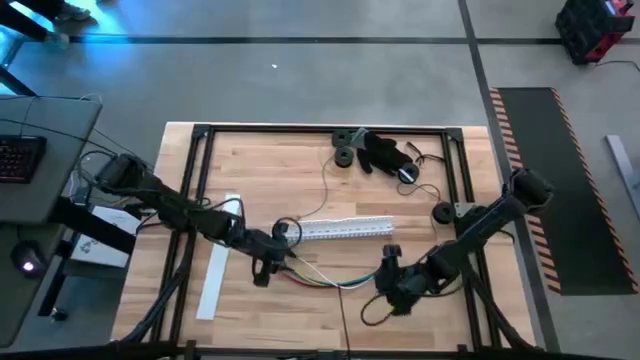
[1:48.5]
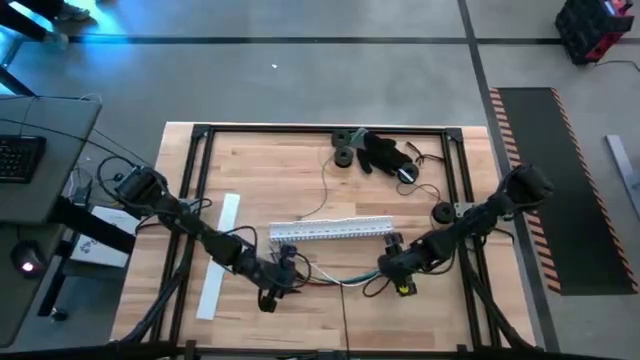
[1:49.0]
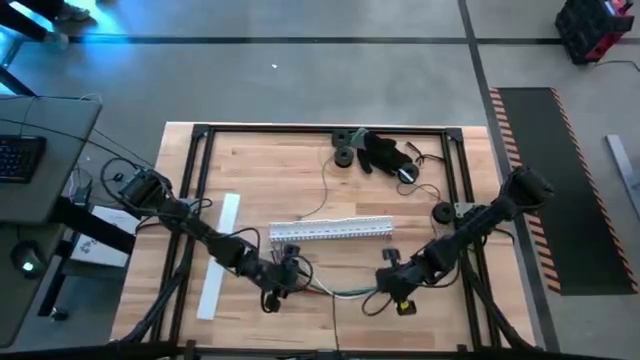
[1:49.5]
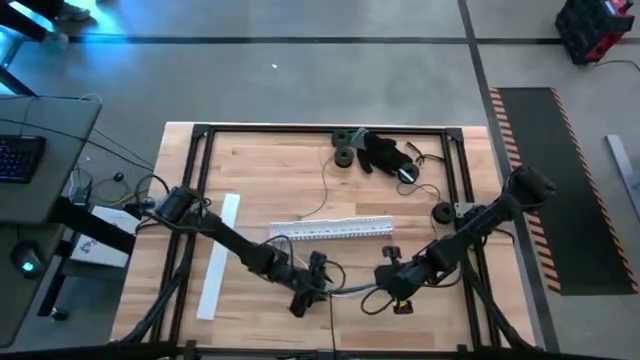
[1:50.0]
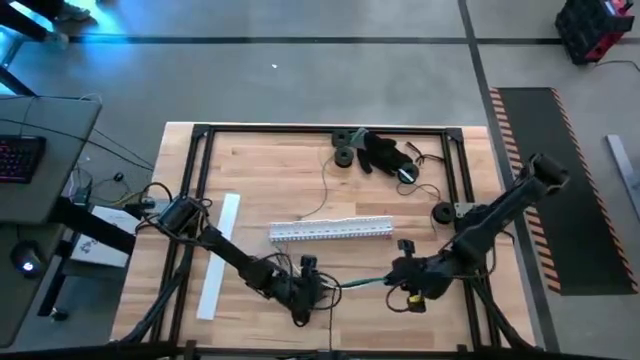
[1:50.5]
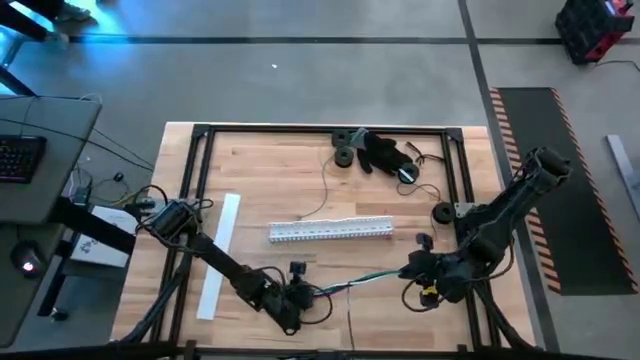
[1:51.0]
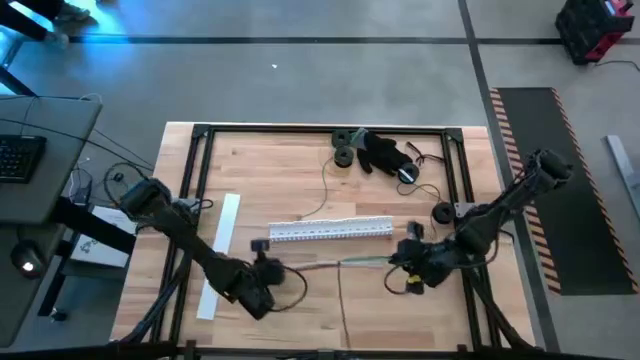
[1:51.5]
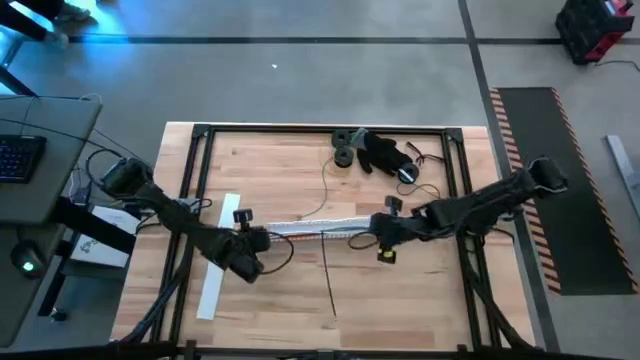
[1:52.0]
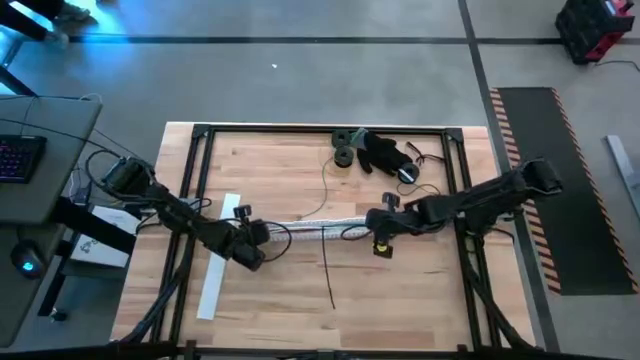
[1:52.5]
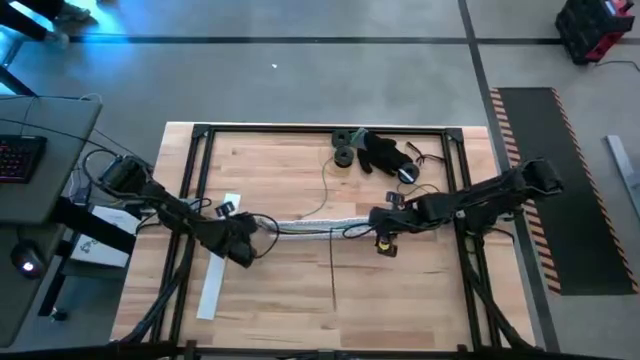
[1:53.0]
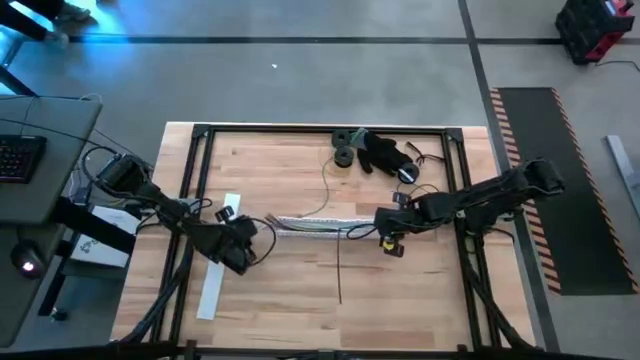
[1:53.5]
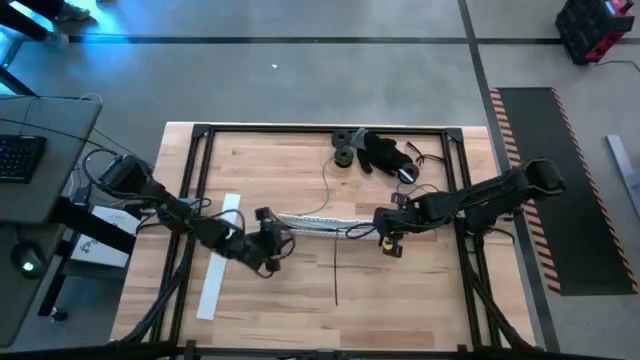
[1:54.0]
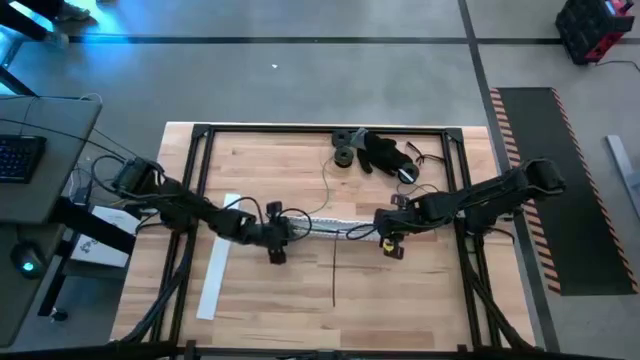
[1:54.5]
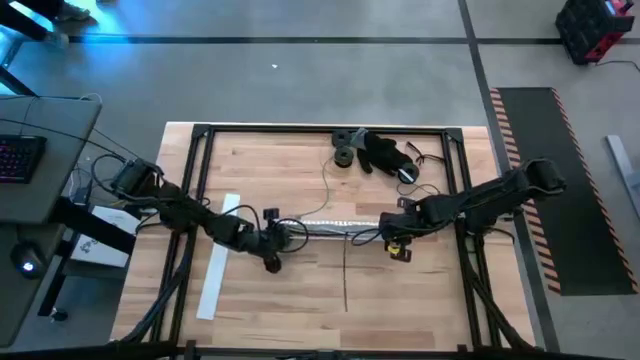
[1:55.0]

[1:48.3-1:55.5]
Task: Ziptie cables
Put the wrapped cable wire into the white cable duct

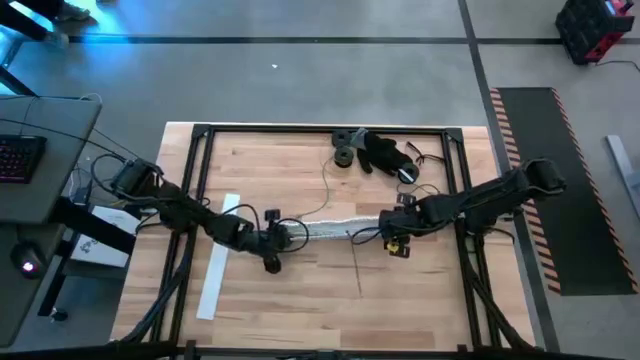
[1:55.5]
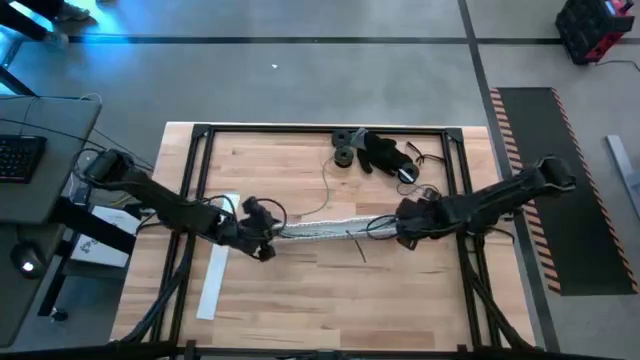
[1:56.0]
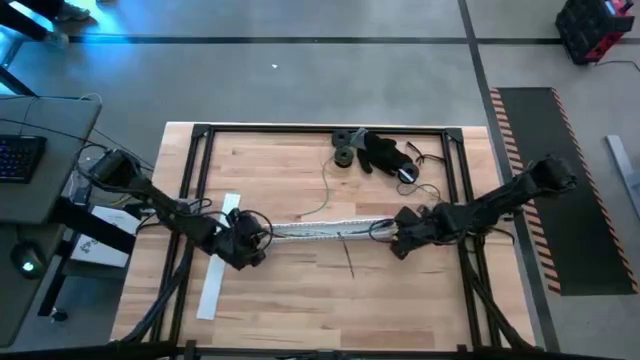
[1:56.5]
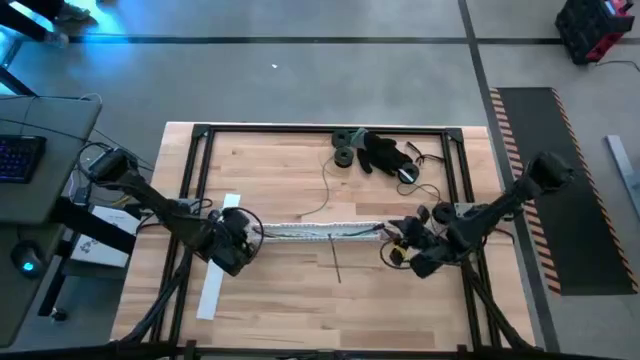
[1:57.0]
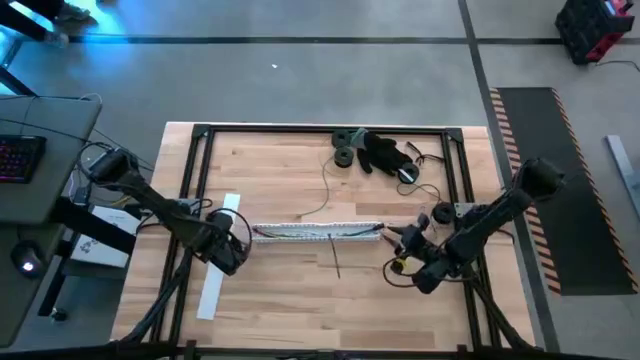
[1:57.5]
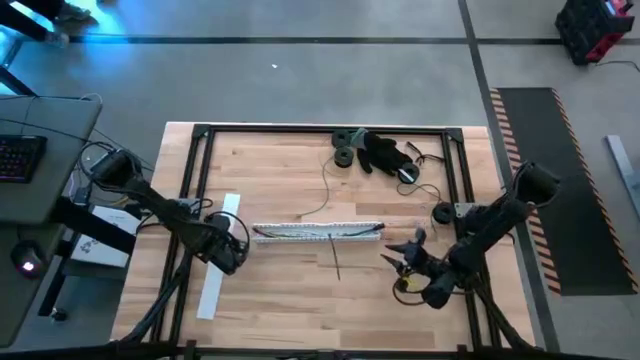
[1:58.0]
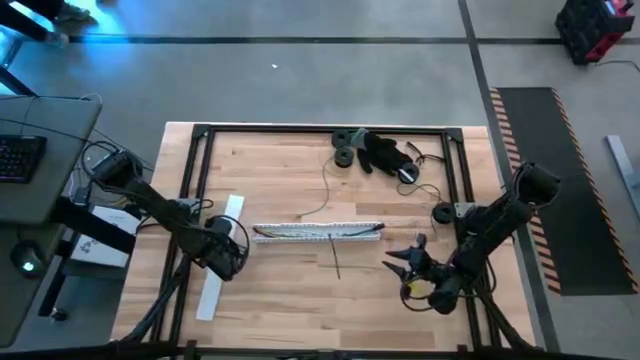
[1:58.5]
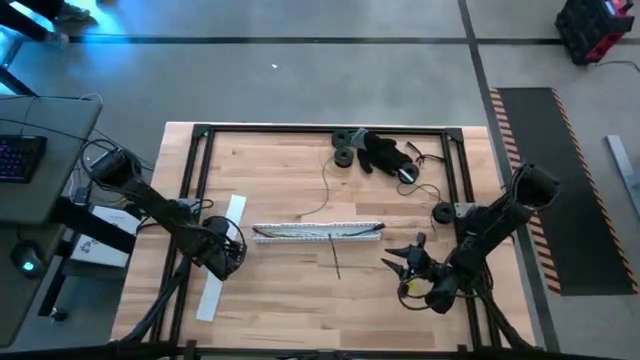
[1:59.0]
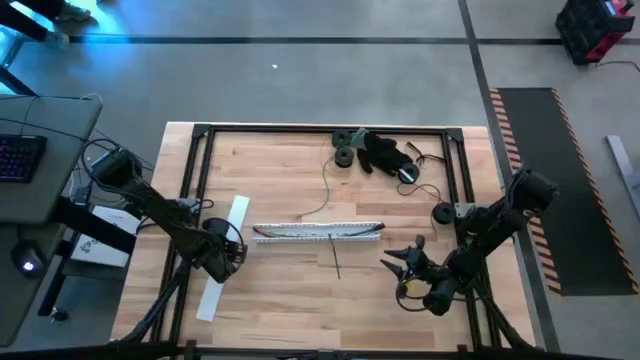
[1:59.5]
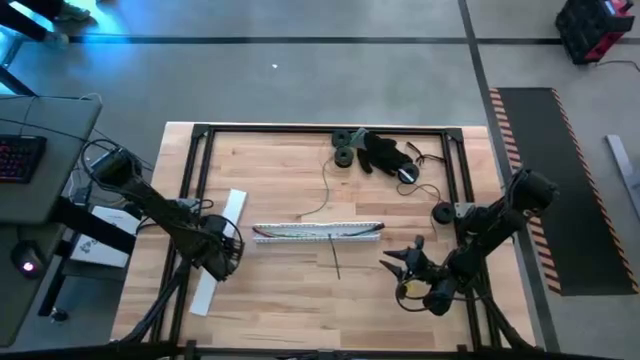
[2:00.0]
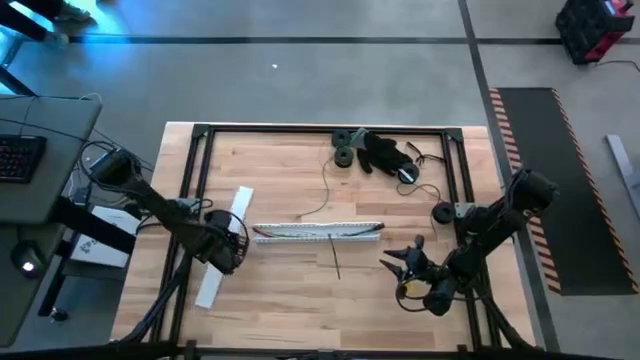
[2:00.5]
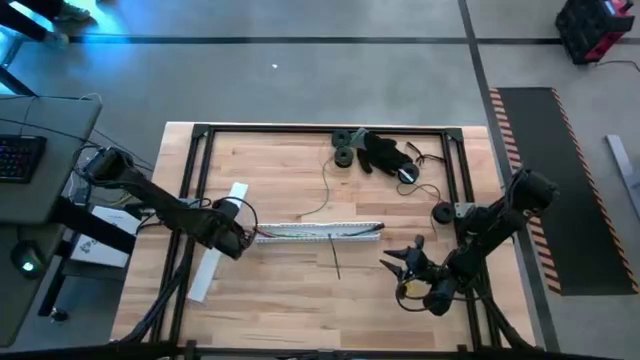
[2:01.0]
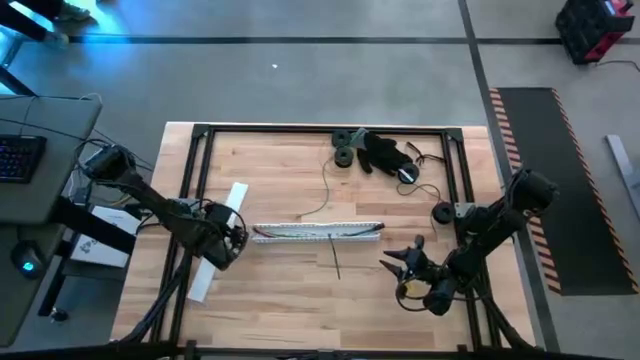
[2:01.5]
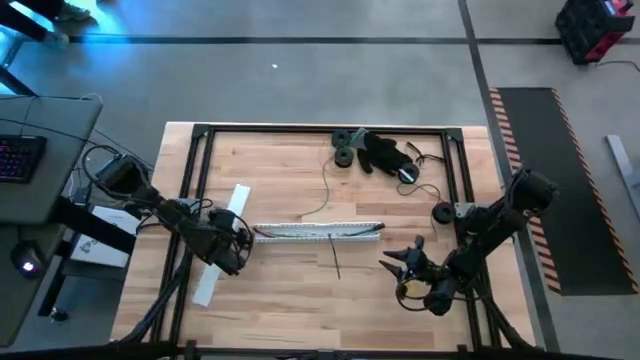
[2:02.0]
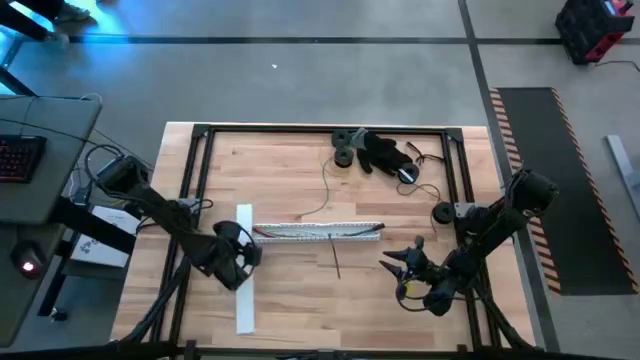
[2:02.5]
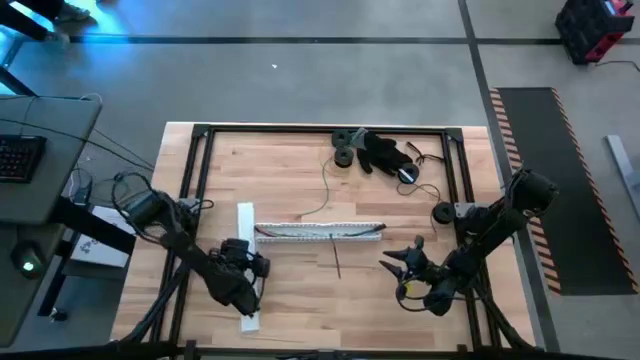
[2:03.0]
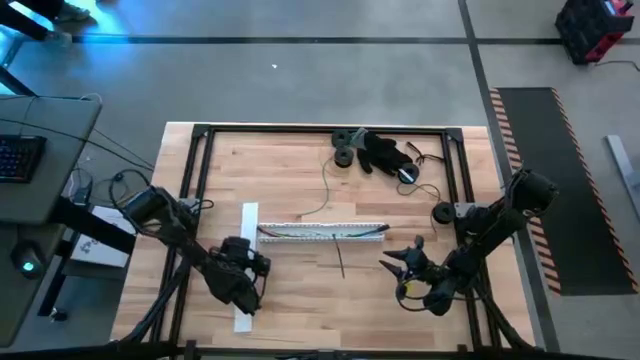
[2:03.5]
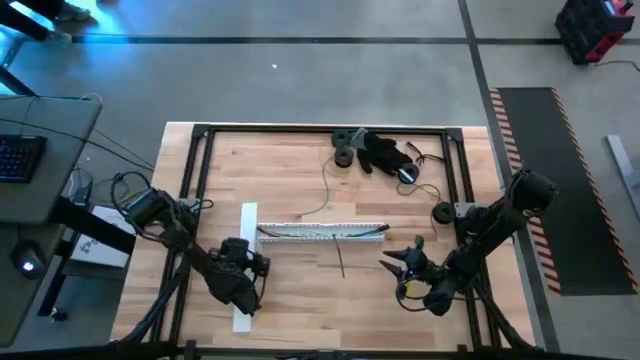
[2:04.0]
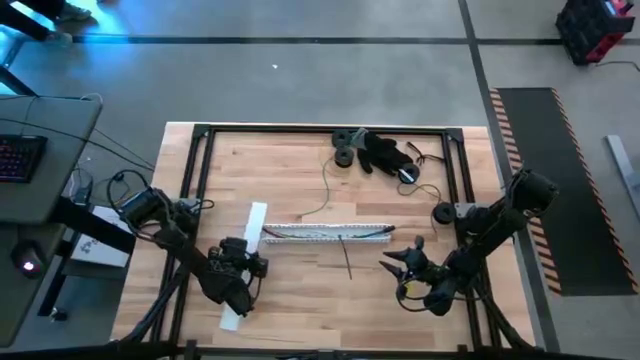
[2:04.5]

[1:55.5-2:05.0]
Close the white cable duct

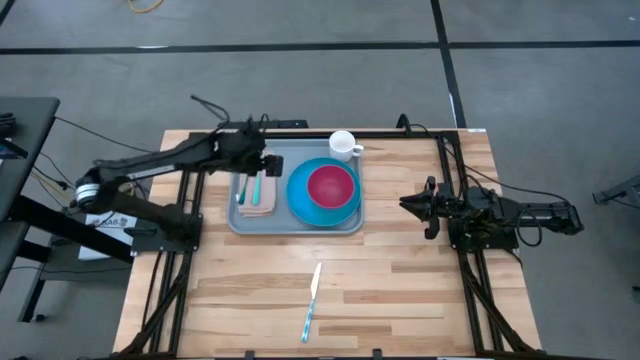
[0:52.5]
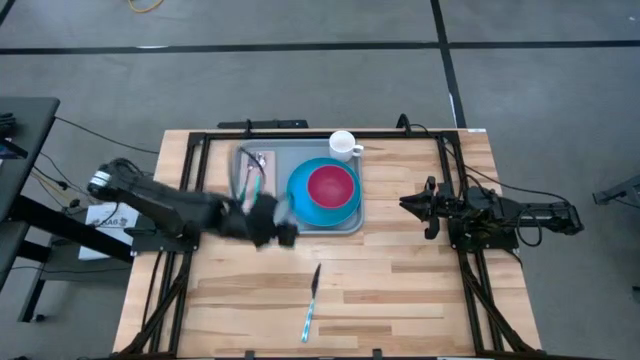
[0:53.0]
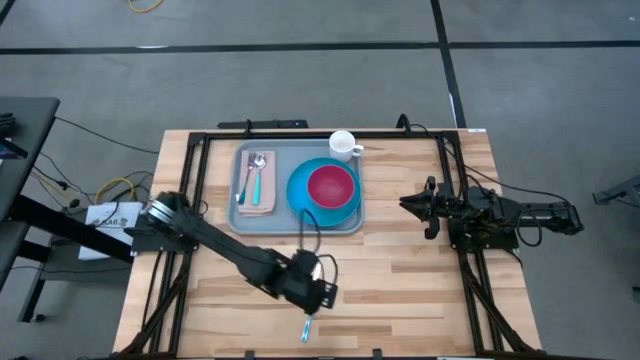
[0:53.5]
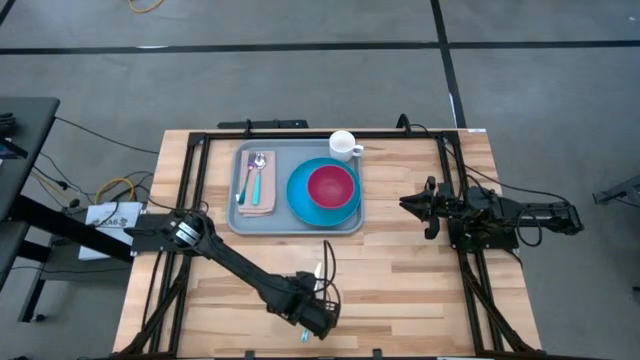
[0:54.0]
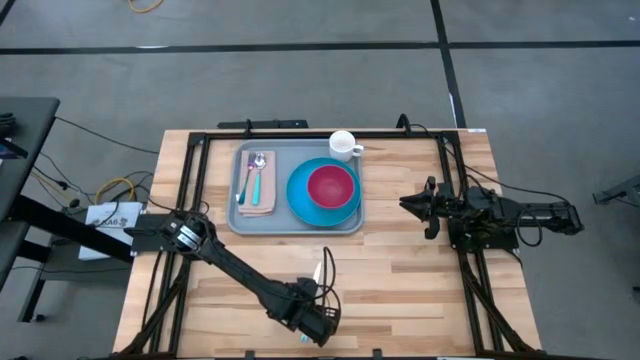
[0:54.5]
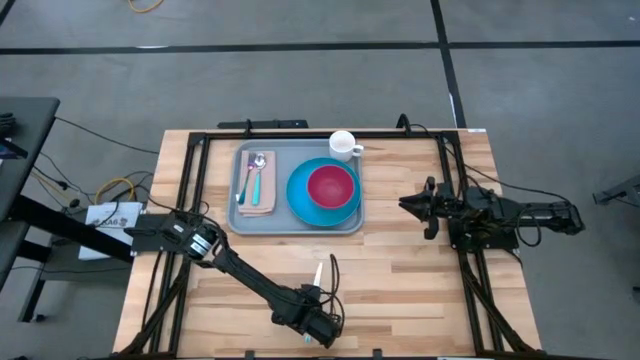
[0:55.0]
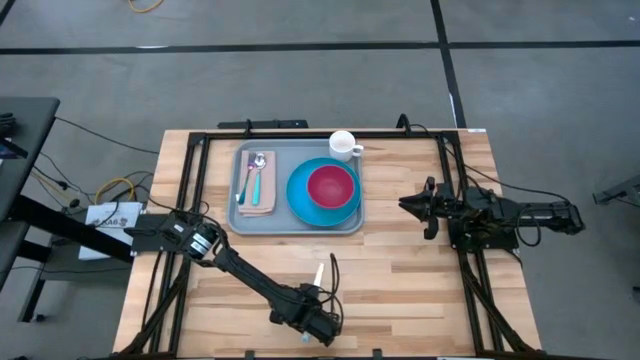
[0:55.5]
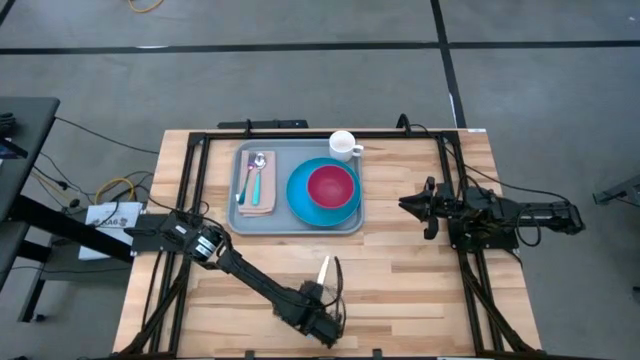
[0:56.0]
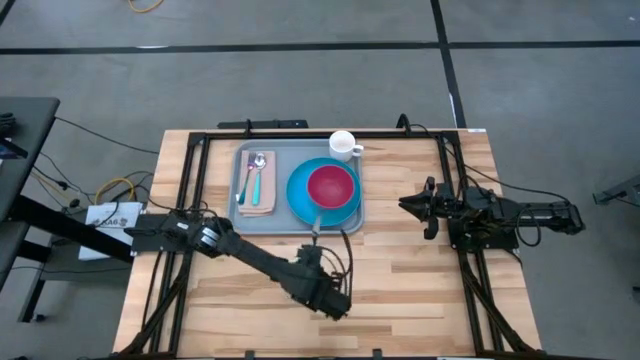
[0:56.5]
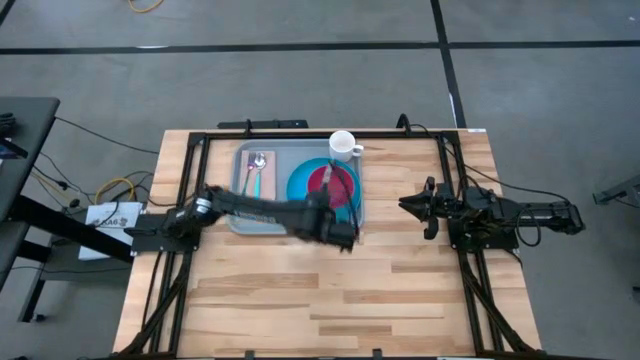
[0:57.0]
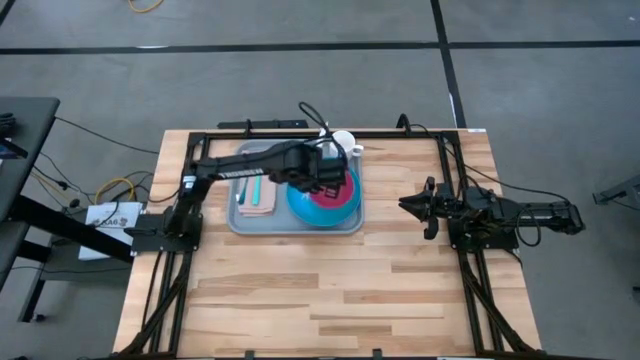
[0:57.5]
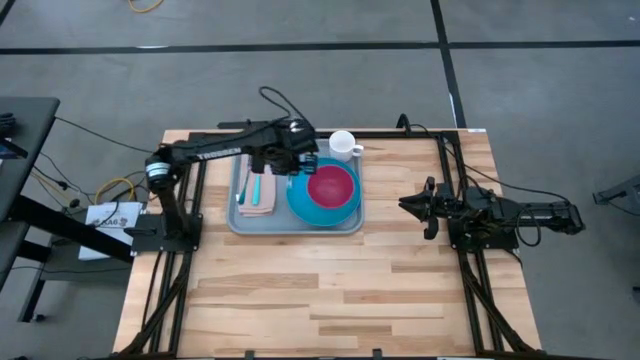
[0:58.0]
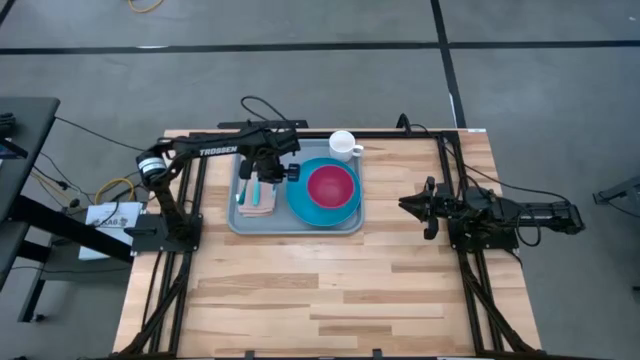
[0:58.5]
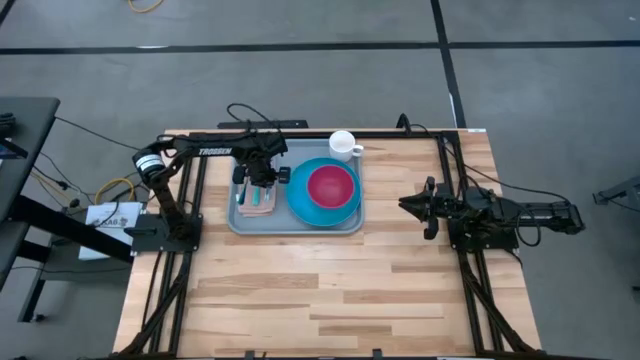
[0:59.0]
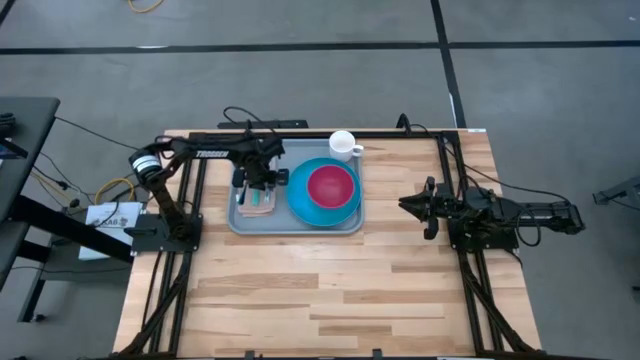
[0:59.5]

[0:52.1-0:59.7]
Task: Set up tray
Put the white patterned knife on the brown napkin to the right of the light blue spoon
